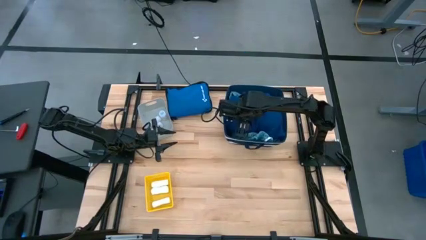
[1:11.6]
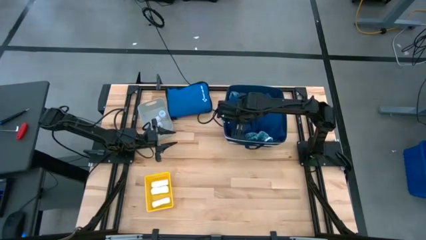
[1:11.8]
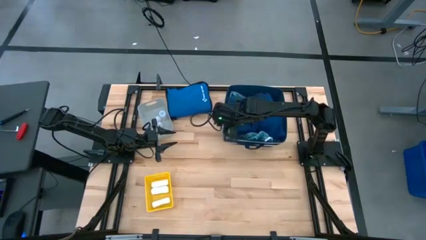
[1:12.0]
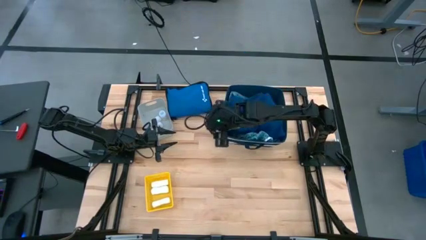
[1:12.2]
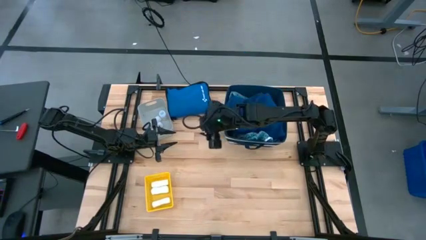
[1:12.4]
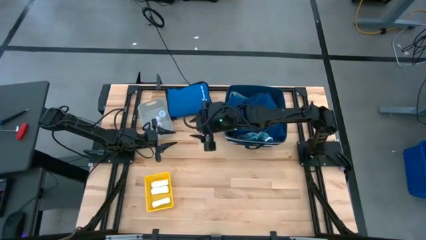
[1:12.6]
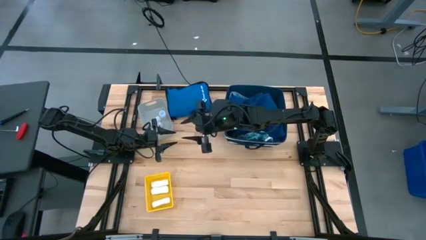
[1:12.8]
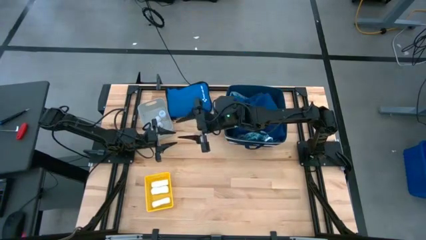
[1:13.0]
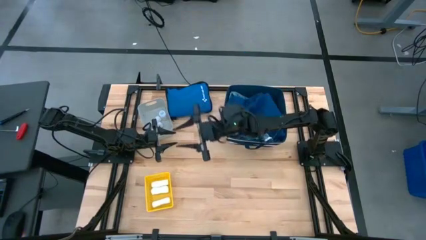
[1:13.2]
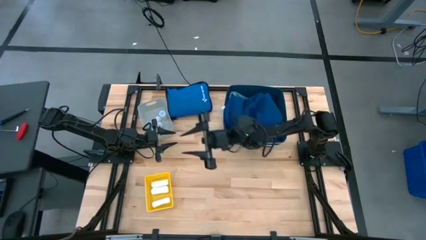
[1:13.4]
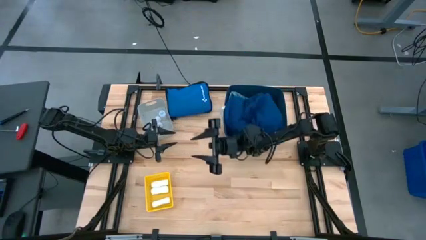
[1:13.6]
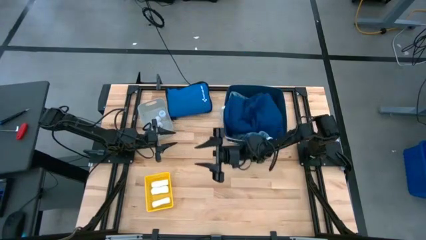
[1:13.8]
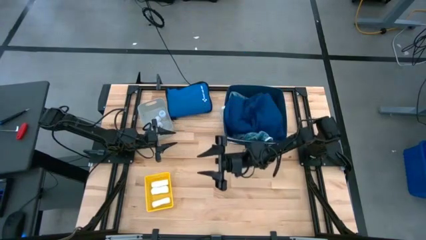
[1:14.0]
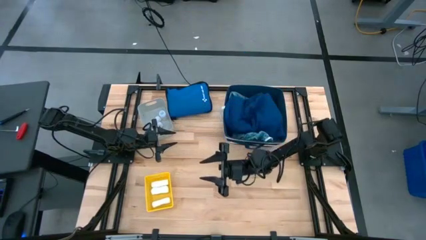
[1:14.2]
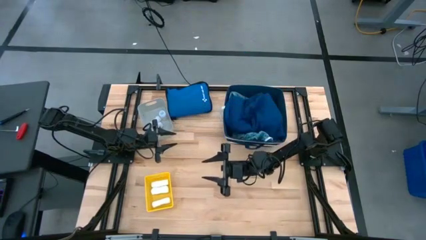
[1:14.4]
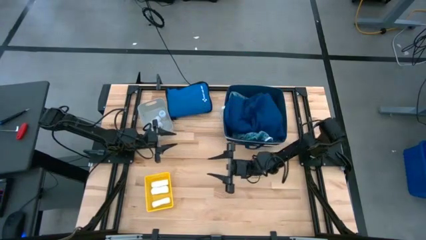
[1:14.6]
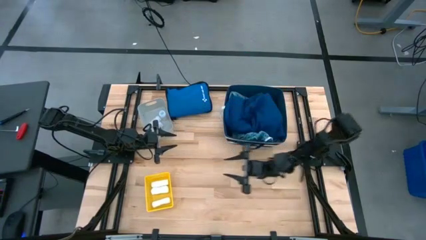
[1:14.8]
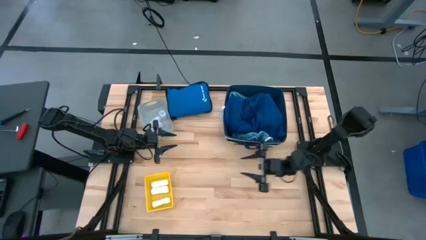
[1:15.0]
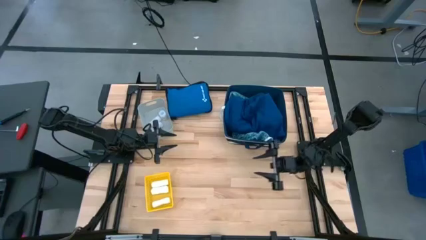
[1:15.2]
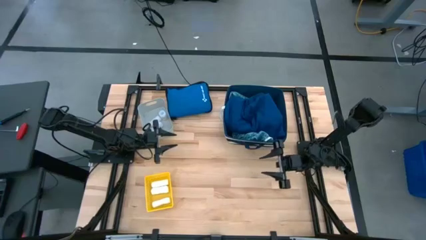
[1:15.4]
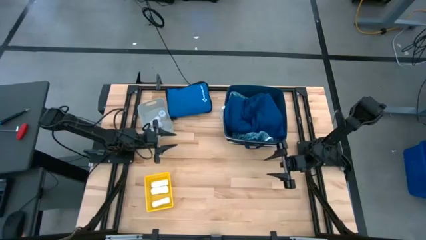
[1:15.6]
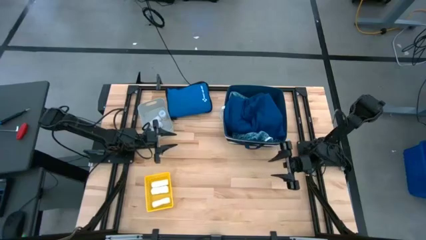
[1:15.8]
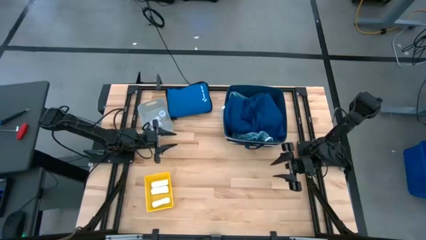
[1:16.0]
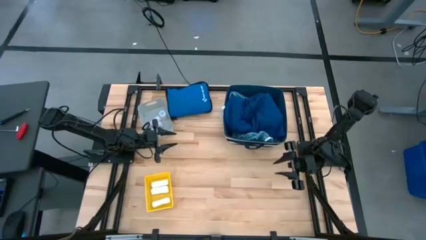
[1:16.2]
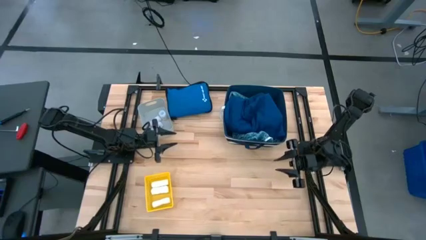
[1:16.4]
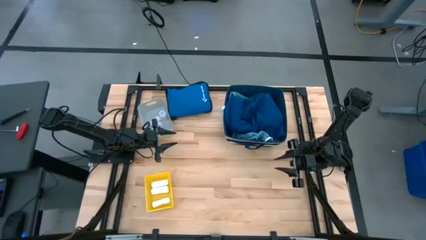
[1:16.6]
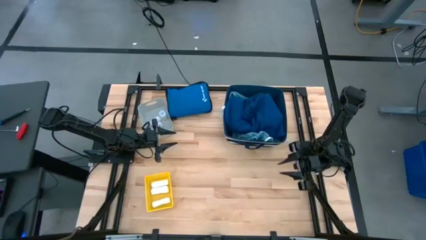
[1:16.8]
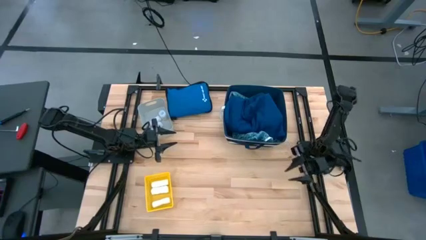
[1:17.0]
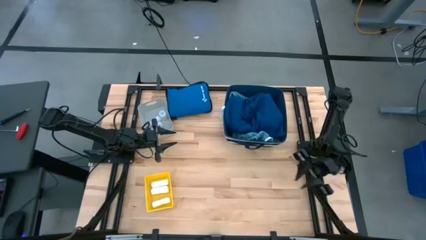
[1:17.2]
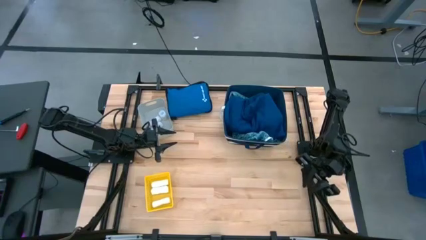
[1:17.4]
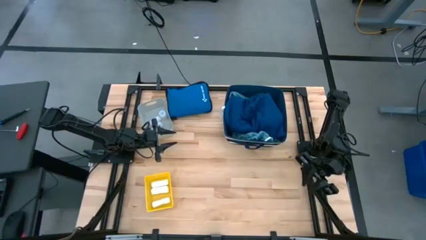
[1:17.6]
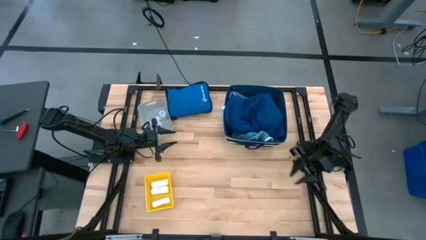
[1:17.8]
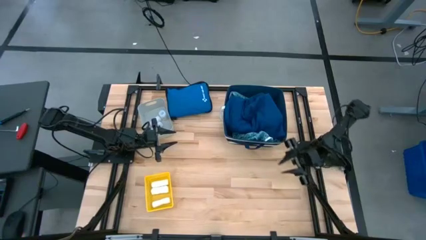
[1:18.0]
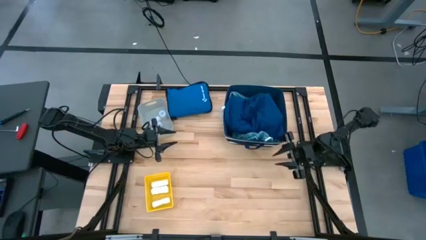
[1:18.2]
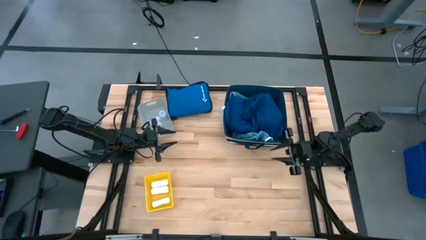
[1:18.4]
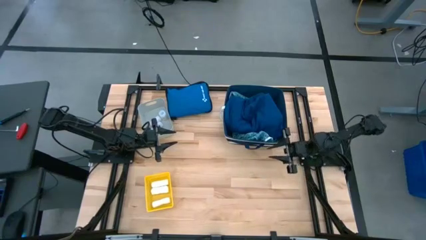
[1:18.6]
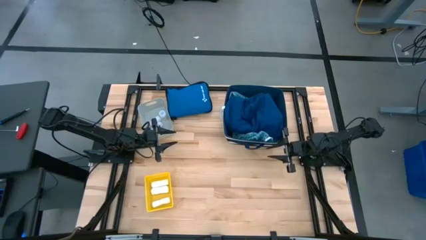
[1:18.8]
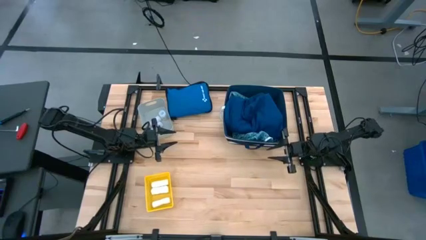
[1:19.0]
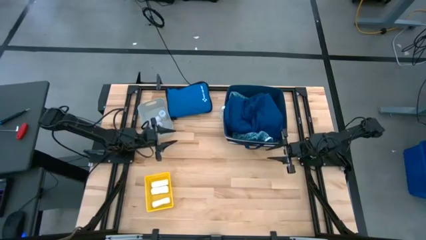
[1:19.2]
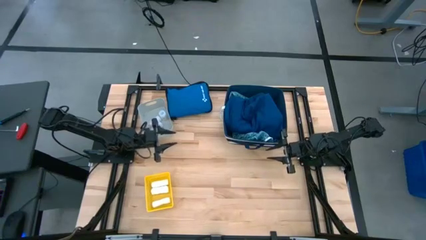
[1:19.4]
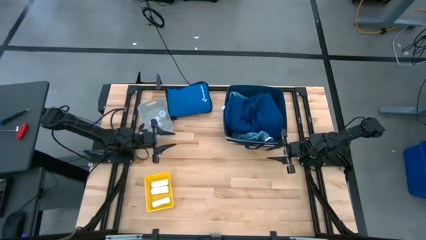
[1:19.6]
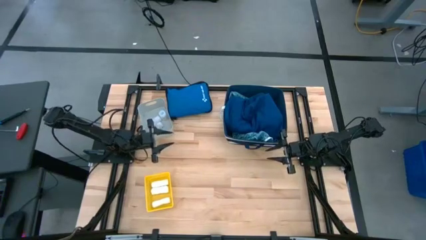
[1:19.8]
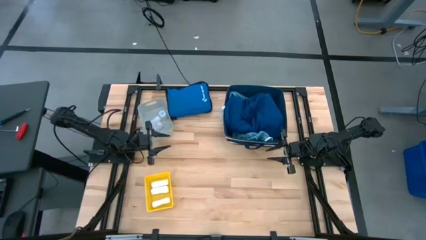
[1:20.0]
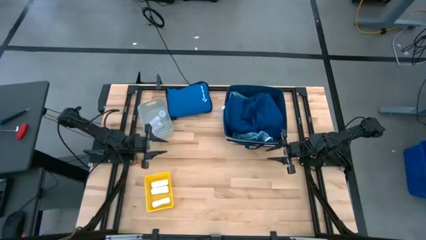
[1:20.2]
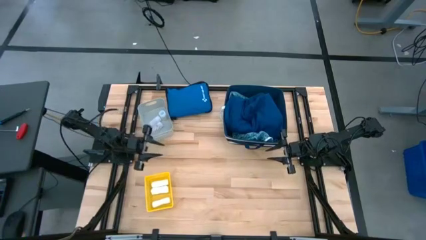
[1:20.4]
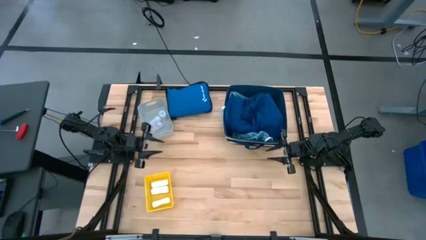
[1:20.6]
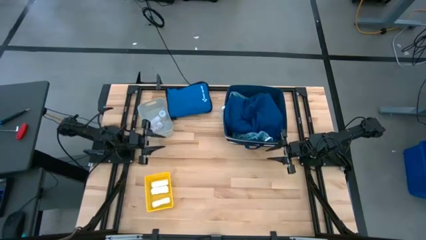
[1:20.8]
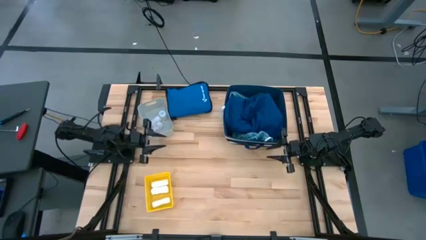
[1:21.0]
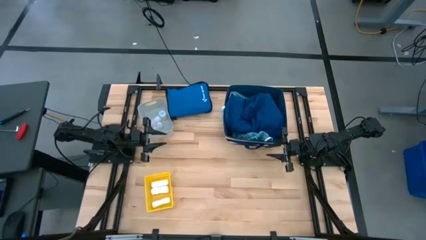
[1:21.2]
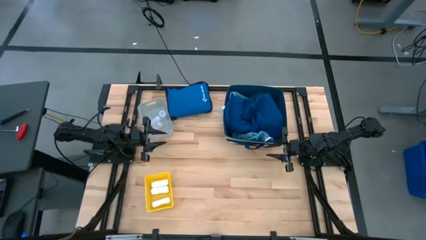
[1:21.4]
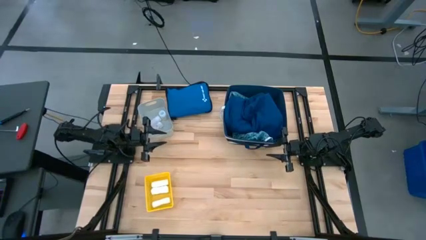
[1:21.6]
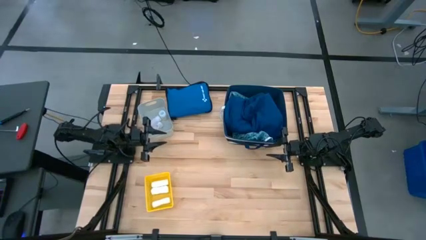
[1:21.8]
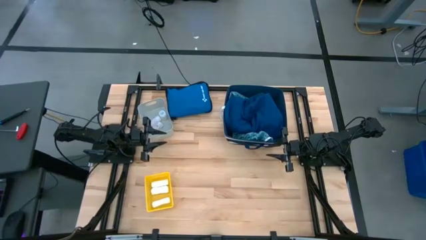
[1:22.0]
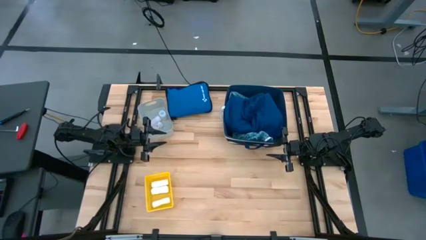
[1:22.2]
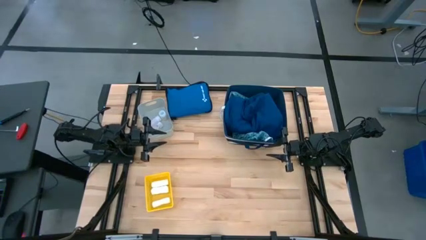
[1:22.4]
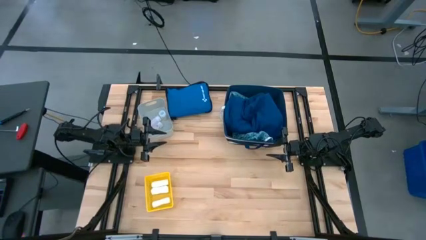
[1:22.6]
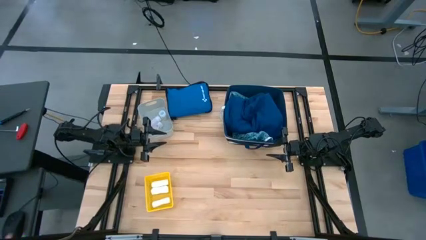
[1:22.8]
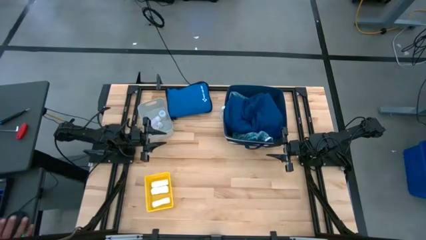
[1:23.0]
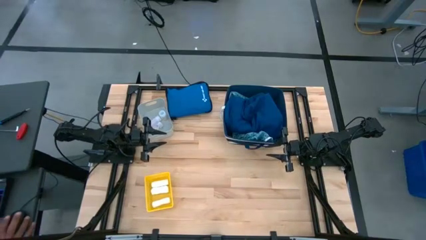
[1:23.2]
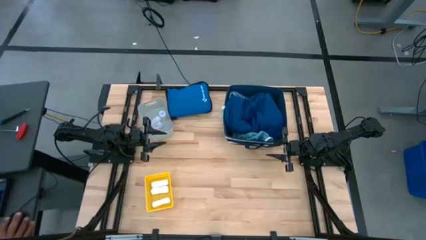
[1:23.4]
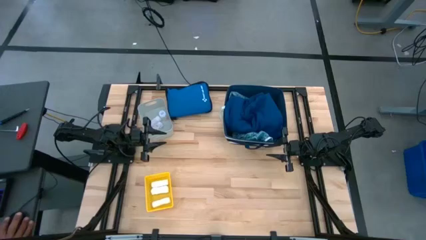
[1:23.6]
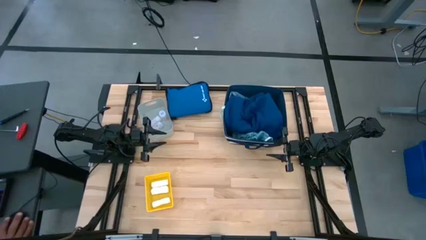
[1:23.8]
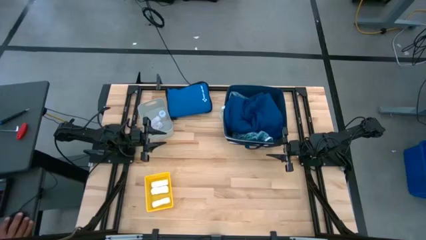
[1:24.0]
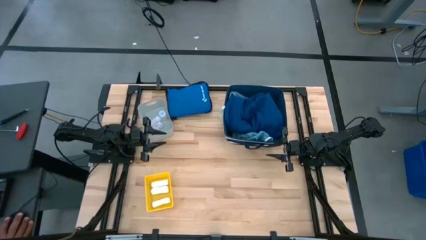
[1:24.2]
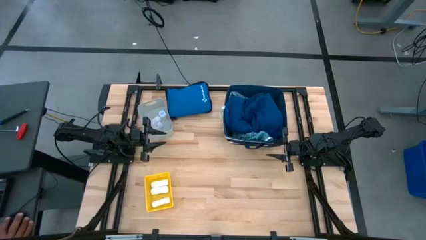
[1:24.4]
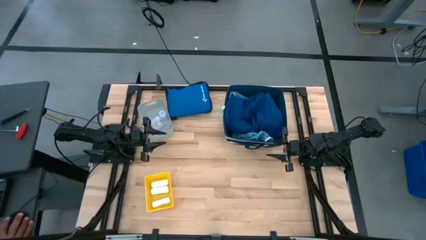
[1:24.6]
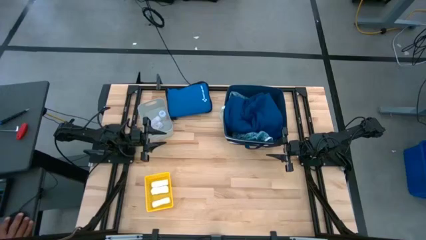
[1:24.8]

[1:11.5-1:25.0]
Task: Pick & place medical supplies in basket/bin
Return to Home Position

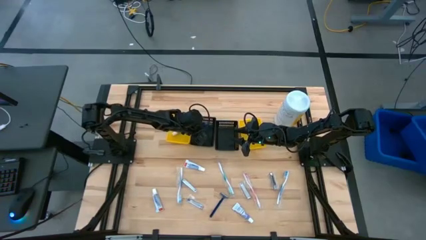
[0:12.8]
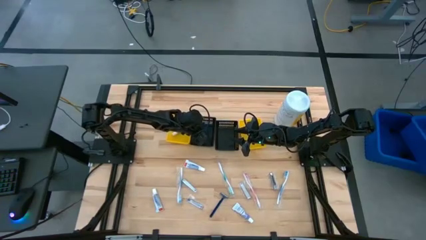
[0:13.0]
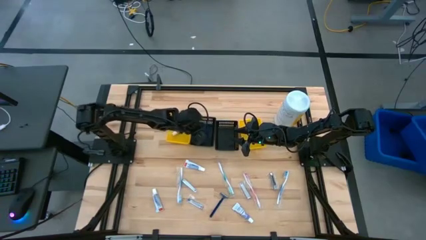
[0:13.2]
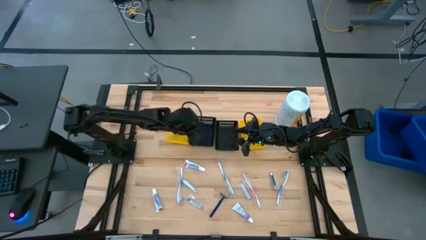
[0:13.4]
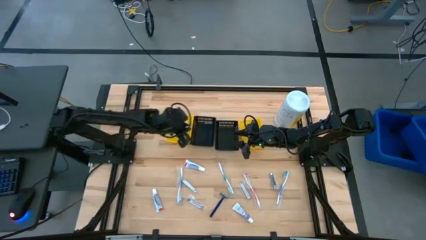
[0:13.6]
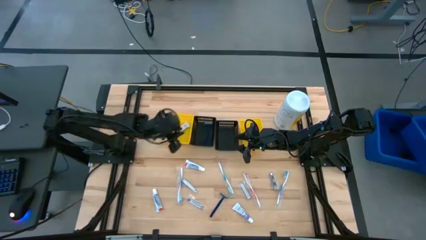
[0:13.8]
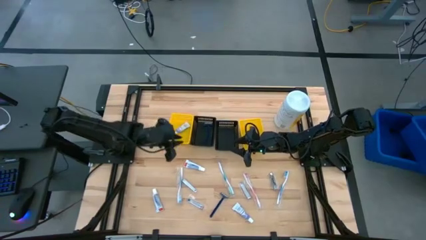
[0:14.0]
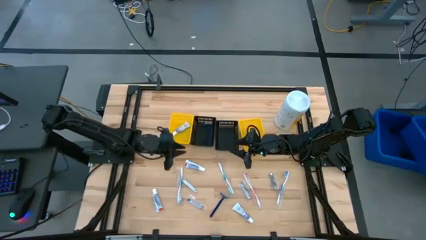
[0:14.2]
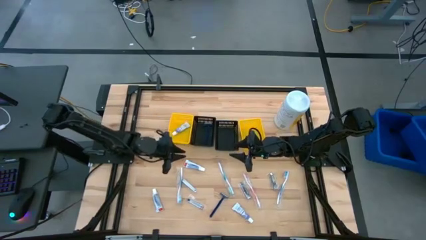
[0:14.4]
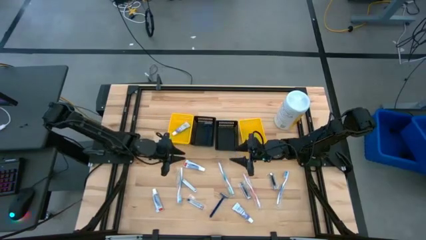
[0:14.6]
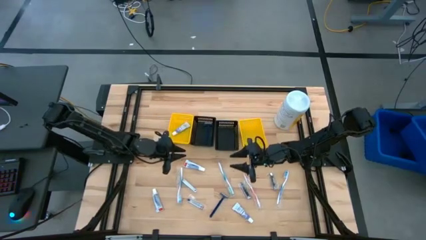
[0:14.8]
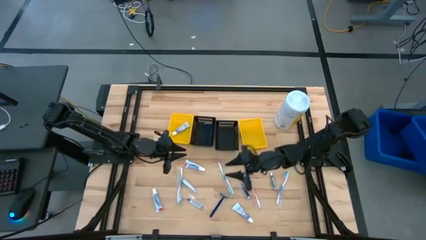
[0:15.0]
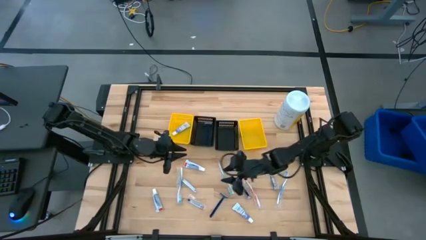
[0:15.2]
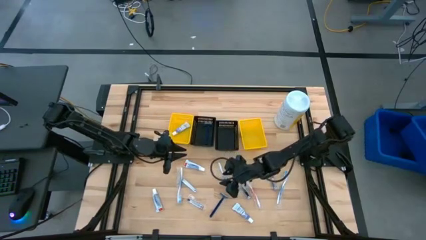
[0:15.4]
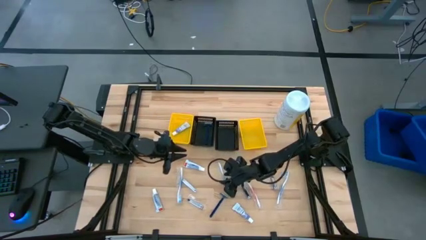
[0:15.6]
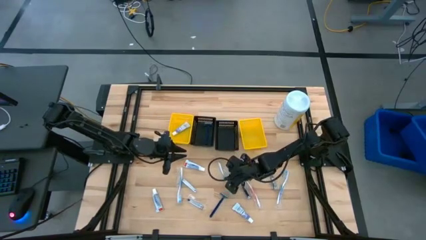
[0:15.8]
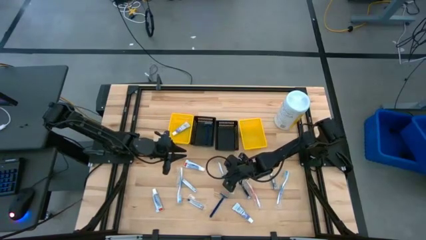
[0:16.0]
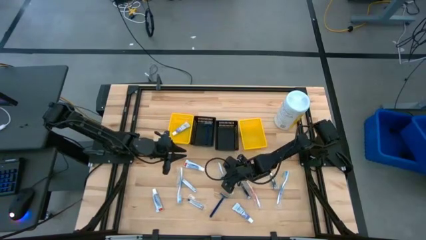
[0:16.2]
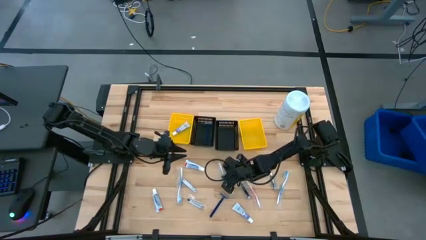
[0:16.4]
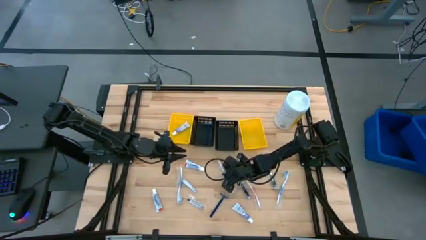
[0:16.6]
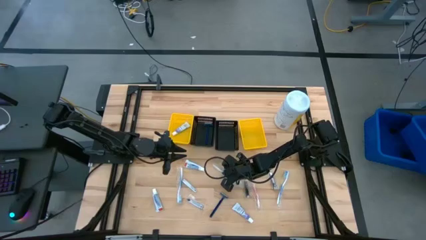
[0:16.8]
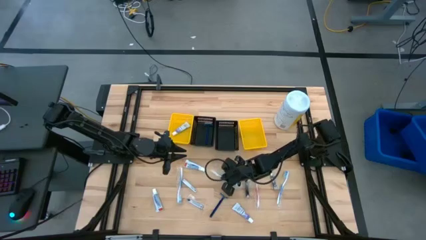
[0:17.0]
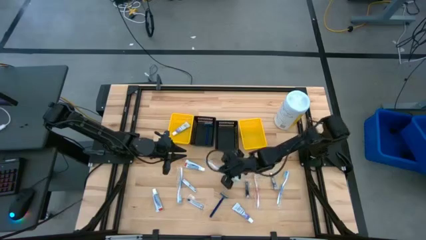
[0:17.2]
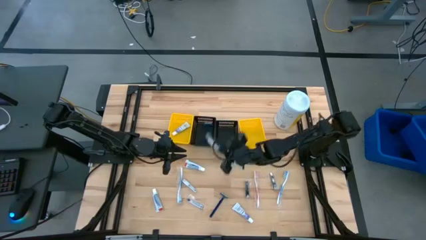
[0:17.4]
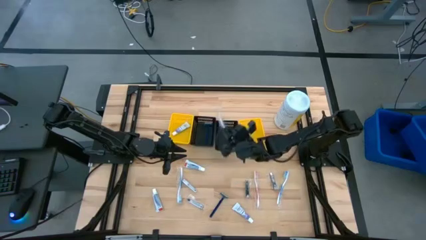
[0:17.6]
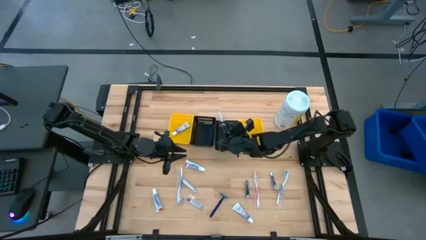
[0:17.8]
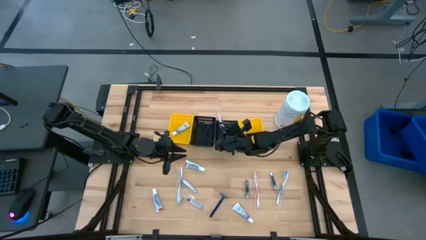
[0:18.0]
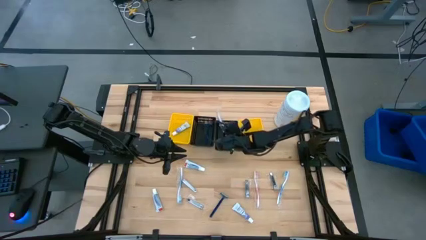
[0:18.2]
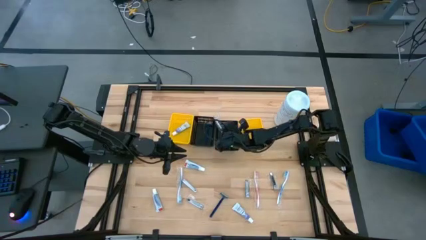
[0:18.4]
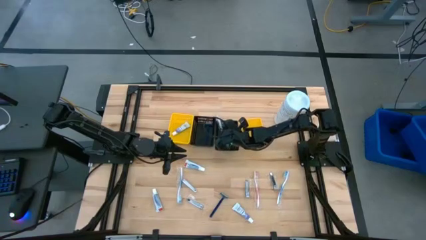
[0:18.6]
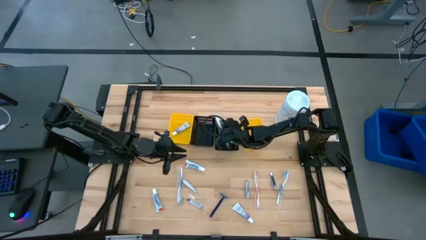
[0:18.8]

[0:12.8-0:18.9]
Task: Pick & Place Travel size toiletries
Put the blue toothbrush into the right black bin
